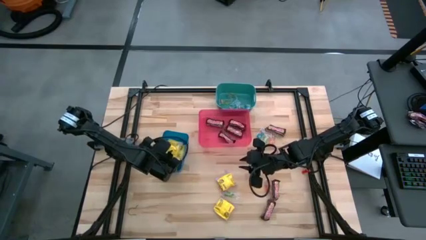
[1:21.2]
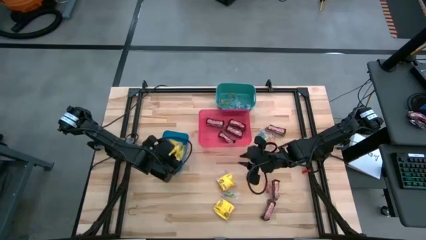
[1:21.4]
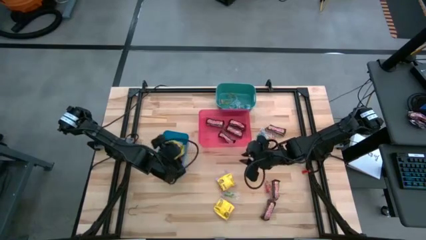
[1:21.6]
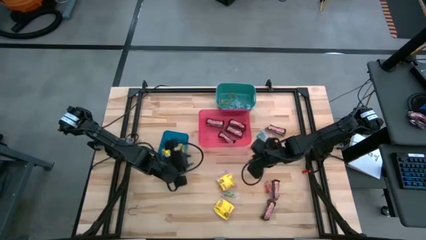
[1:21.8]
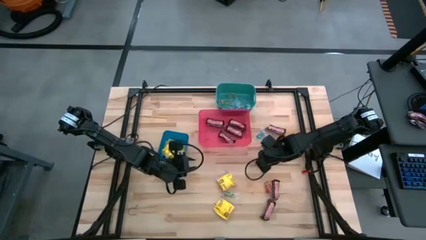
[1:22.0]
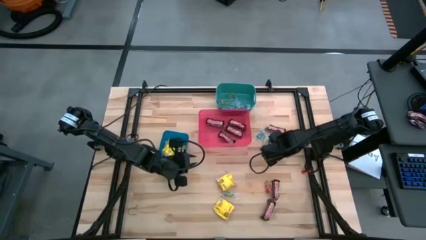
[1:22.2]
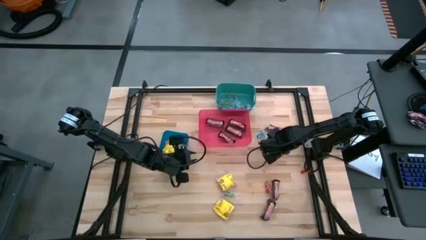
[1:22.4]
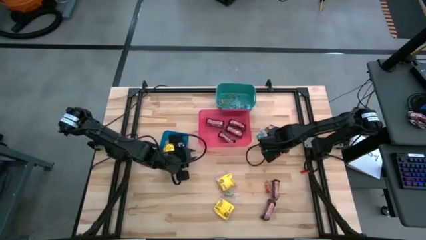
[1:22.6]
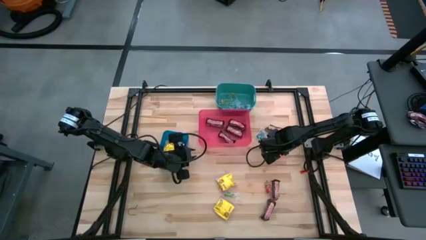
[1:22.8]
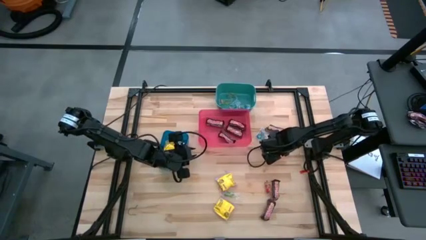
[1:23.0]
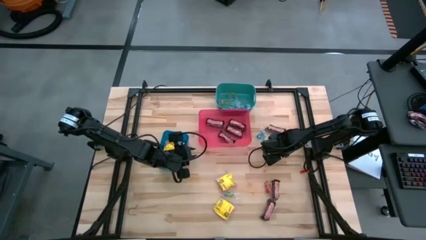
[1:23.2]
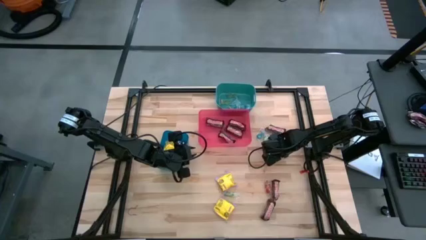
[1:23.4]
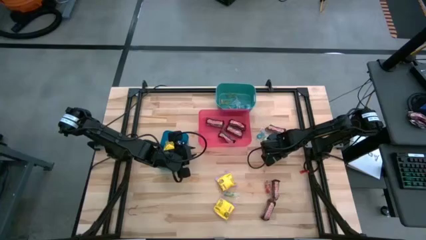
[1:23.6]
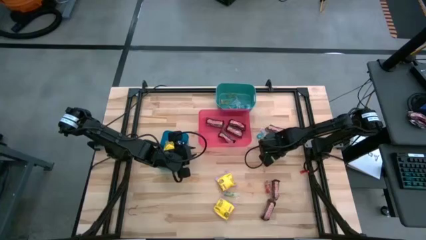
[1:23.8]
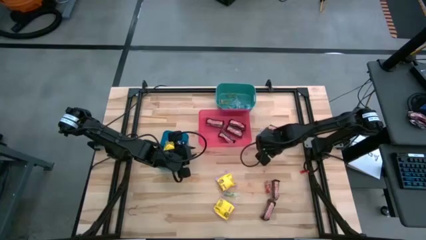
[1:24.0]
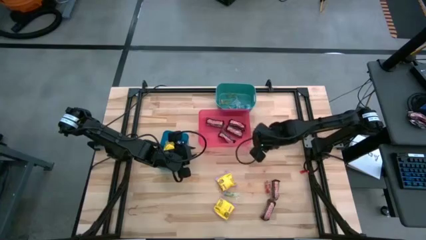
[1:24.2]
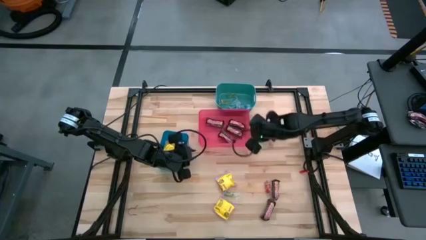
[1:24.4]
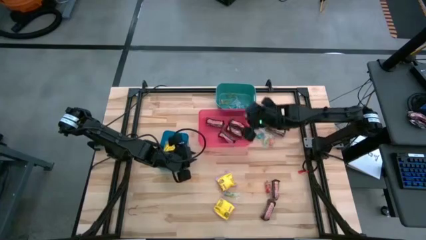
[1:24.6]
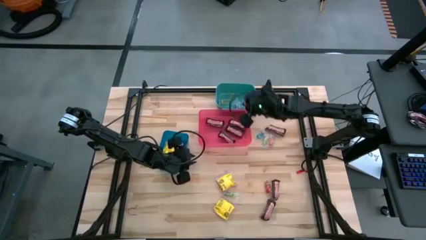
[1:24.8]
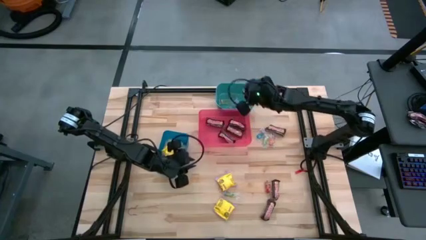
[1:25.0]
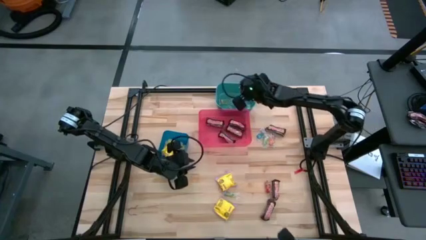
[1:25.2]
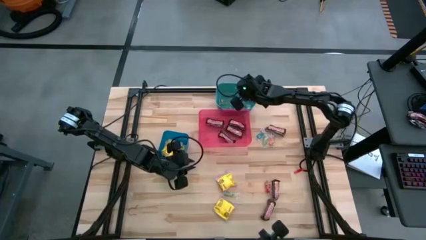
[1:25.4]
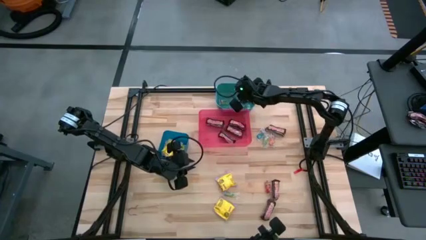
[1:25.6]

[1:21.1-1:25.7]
Task: Sort candy
Put the orange gummy into the green bin

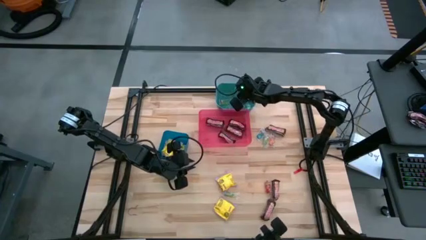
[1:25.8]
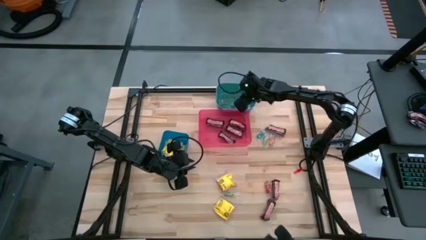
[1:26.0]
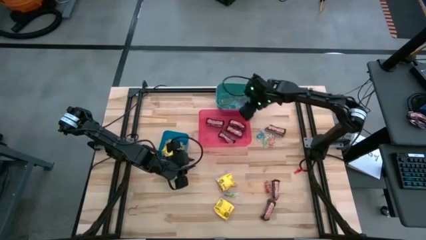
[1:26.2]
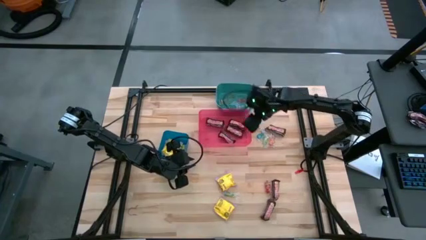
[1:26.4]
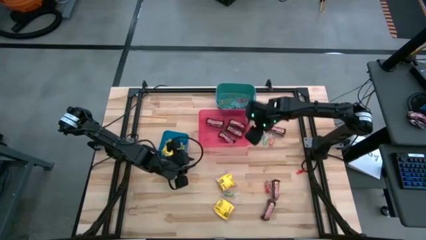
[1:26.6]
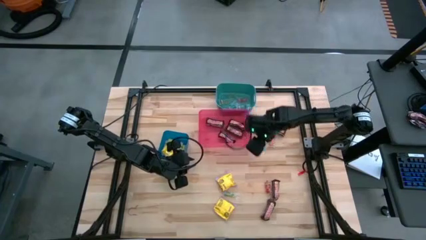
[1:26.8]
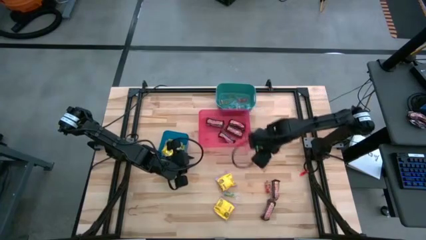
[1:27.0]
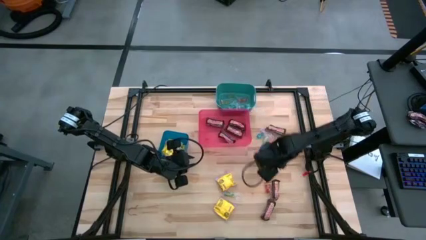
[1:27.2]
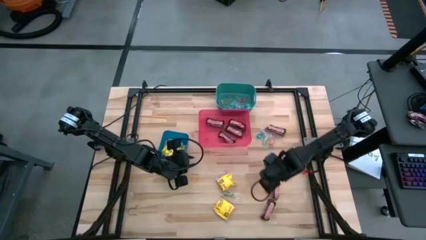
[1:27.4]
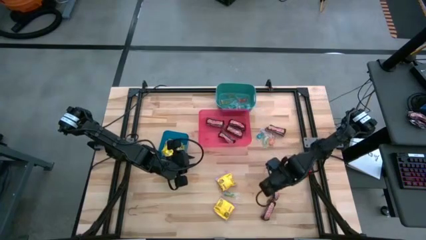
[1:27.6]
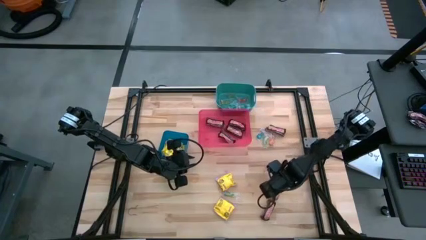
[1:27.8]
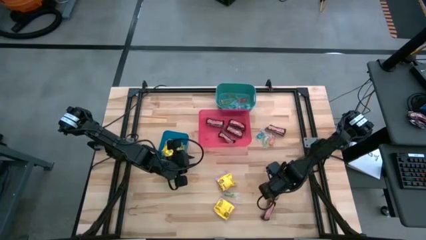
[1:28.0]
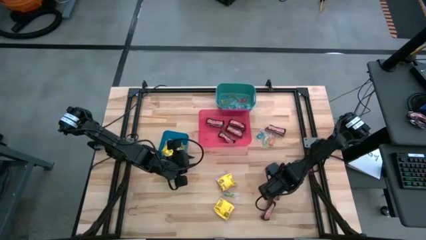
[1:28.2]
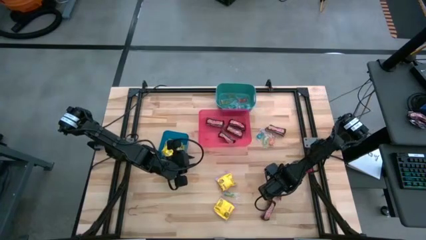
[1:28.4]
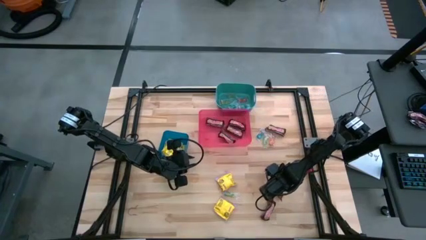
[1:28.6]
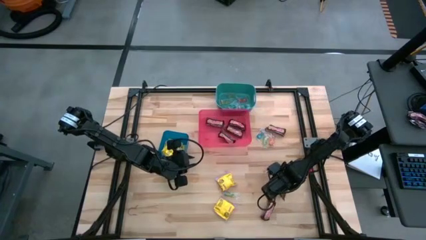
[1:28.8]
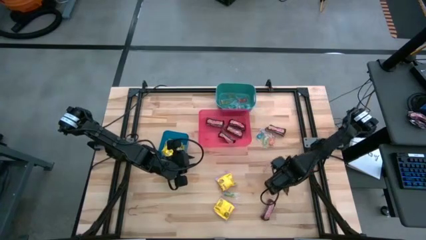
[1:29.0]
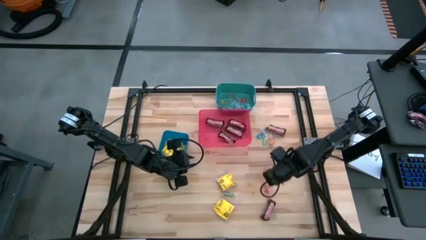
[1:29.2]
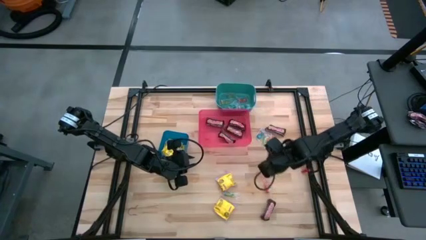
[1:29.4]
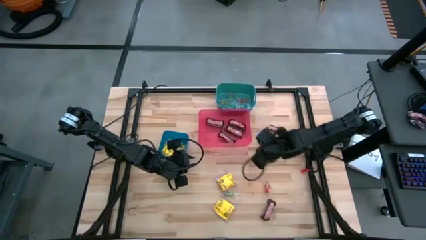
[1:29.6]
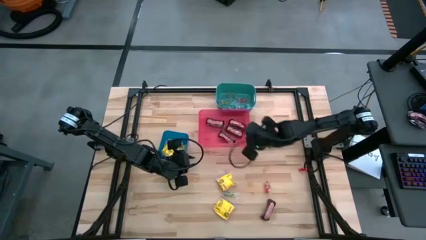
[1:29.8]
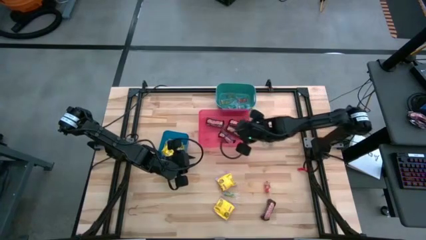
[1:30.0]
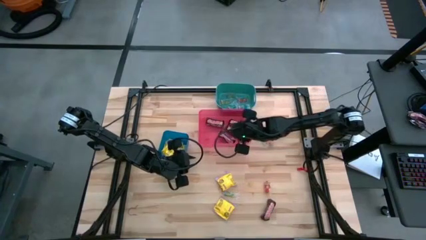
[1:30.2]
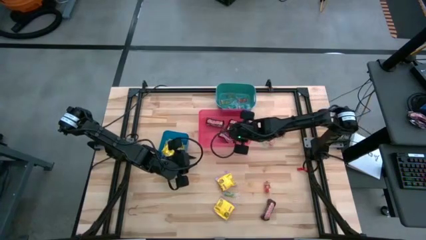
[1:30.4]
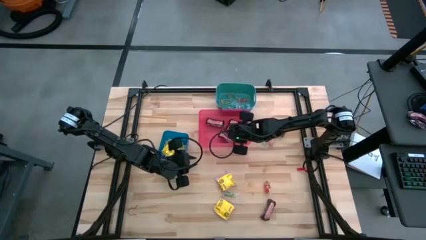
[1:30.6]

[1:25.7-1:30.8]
Put the brown chocolate bar into the red bin

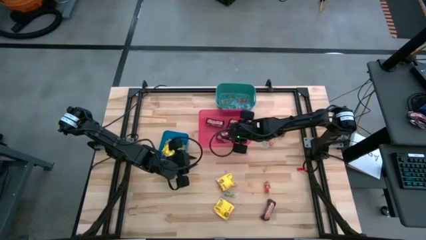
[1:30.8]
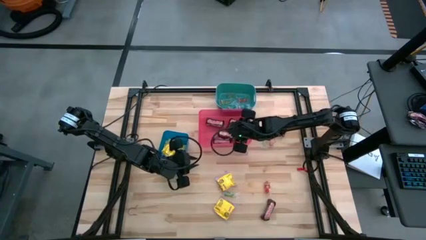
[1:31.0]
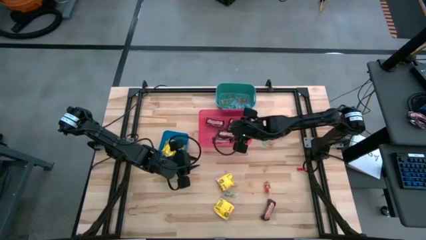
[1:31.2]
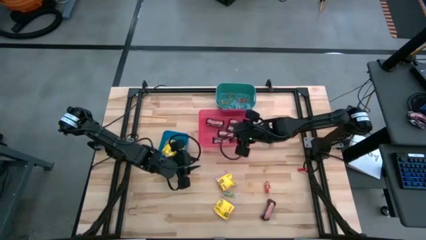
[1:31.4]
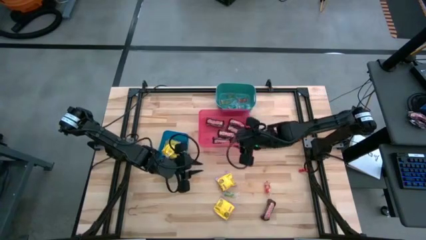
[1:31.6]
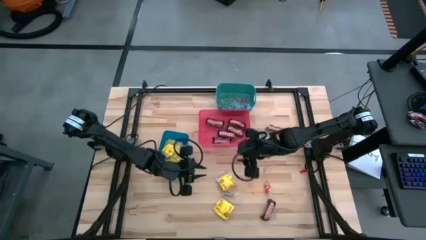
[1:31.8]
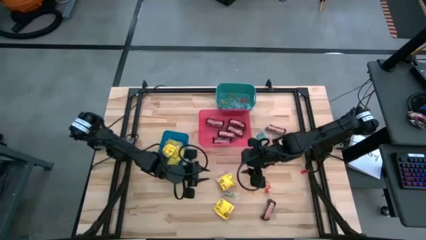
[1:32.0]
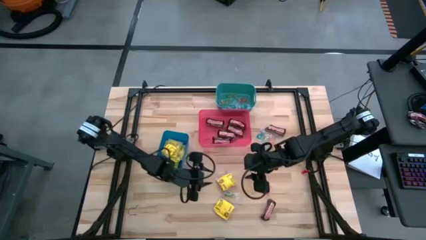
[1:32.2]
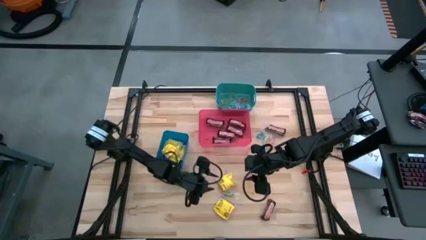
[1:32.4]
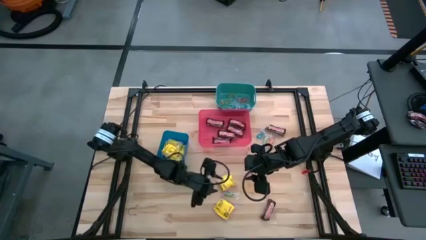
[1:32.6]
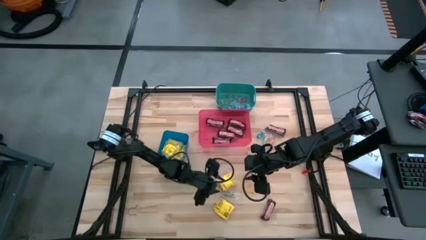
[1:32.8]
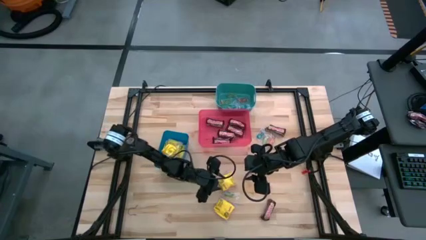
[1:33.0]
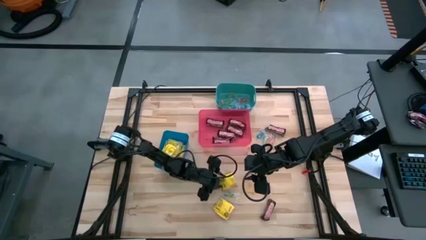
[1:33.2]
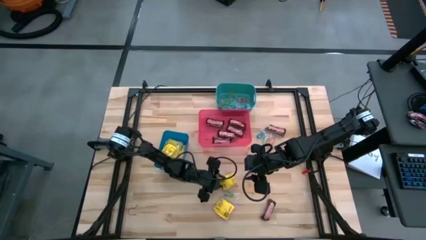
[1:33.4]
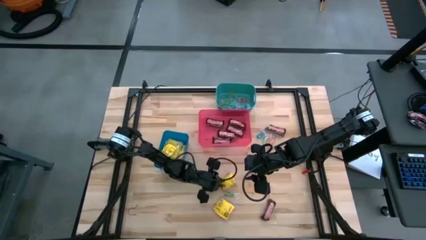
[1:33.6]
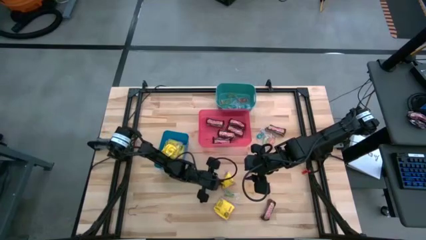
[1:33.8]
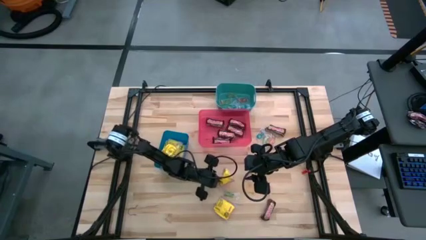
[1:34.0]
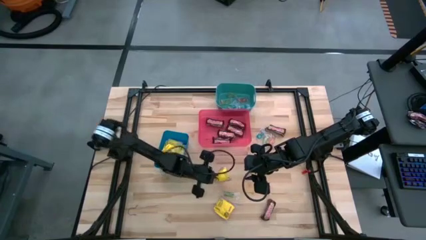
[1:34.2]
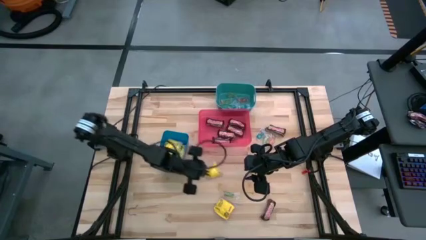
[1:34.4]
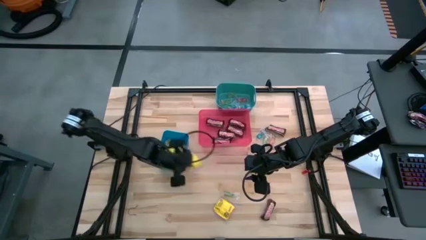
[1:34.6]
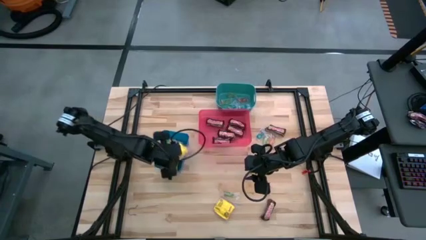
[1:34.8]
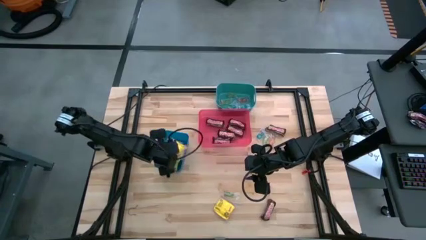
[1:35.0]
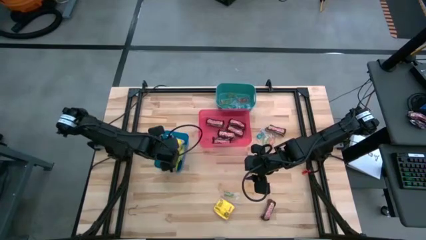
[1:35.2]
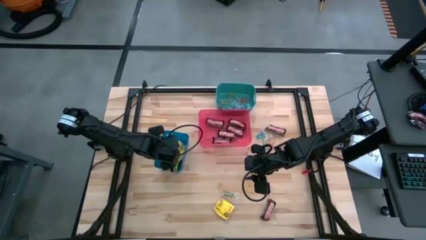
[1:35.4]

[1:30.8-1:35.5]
Put the yellow candy into the blue bin
